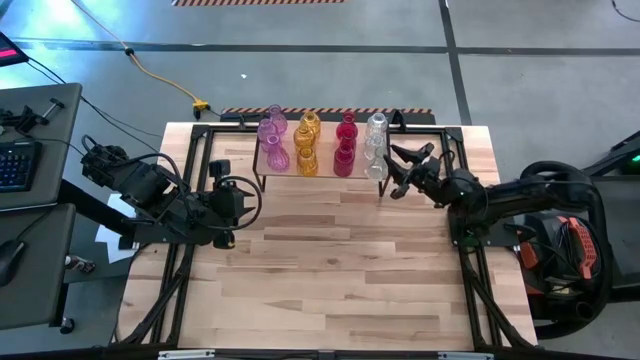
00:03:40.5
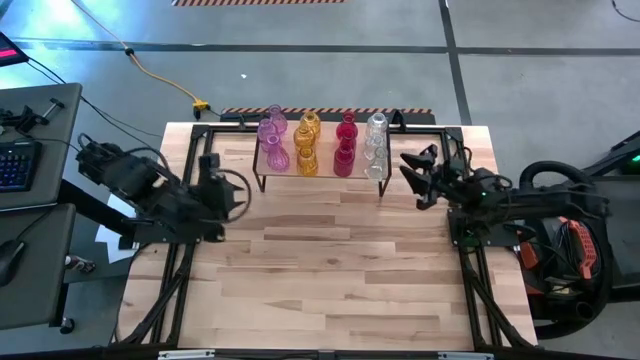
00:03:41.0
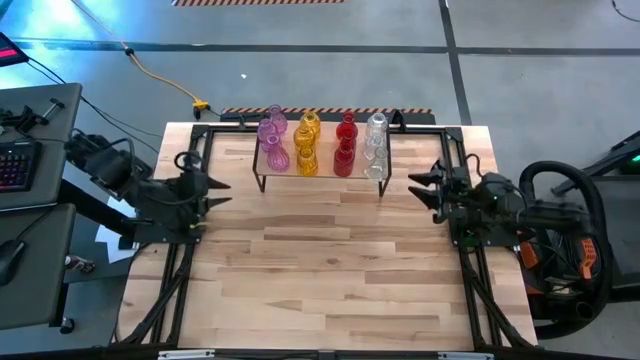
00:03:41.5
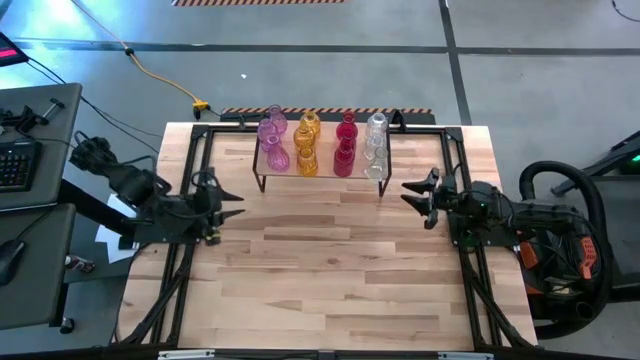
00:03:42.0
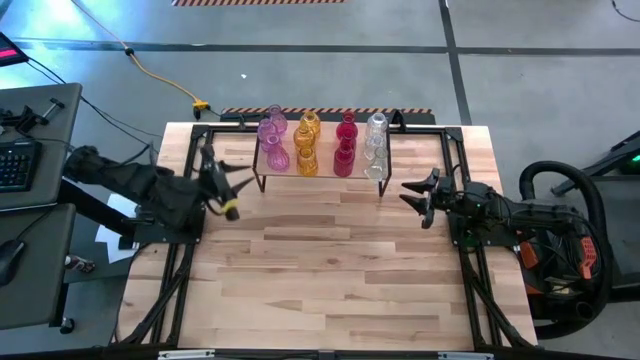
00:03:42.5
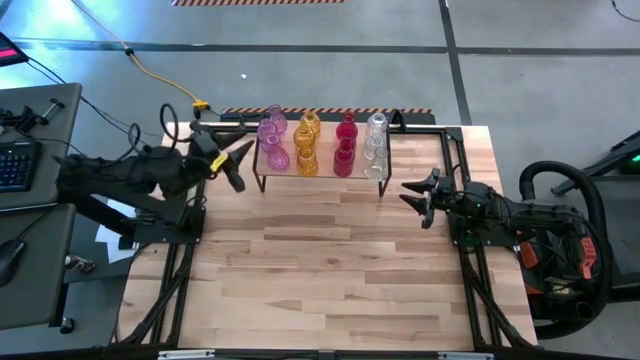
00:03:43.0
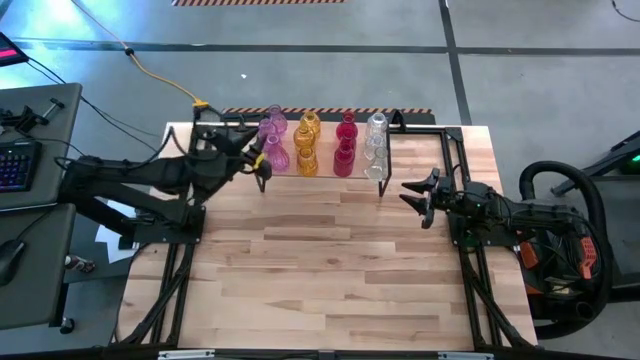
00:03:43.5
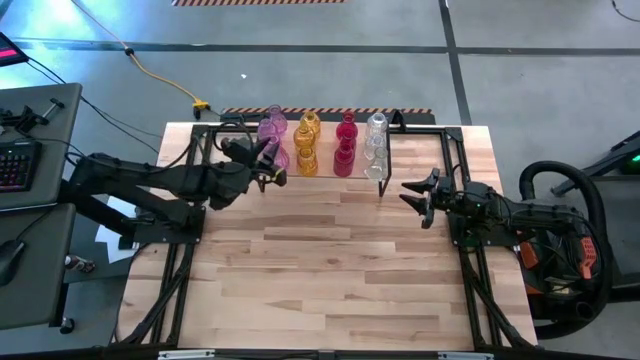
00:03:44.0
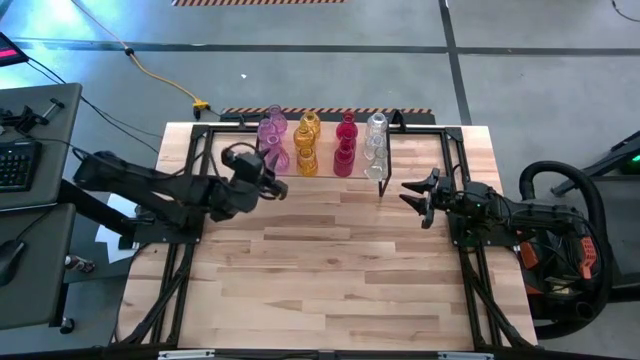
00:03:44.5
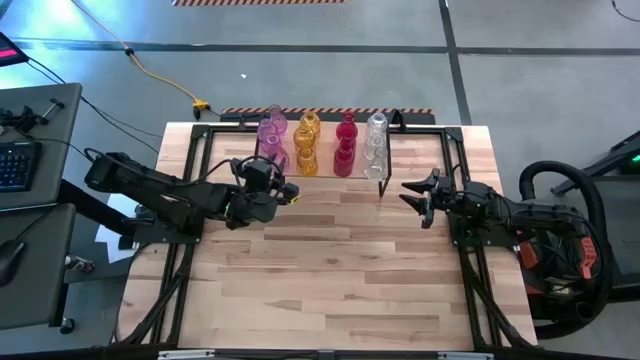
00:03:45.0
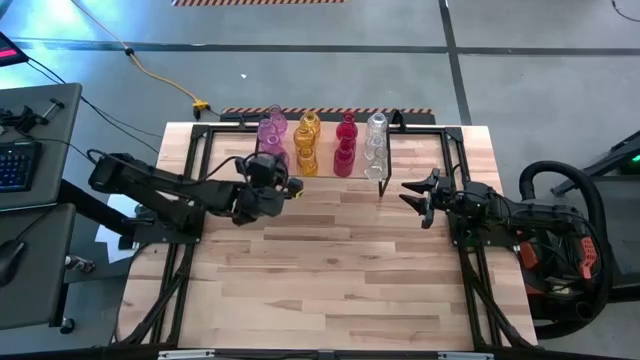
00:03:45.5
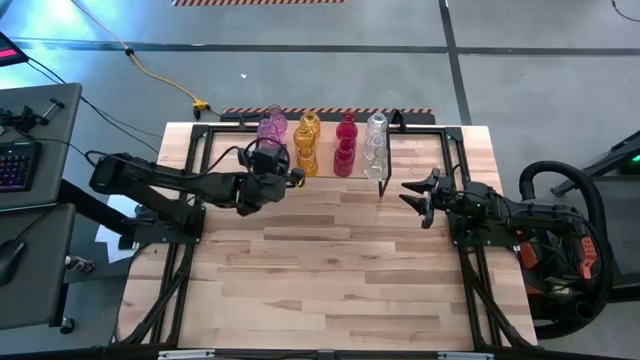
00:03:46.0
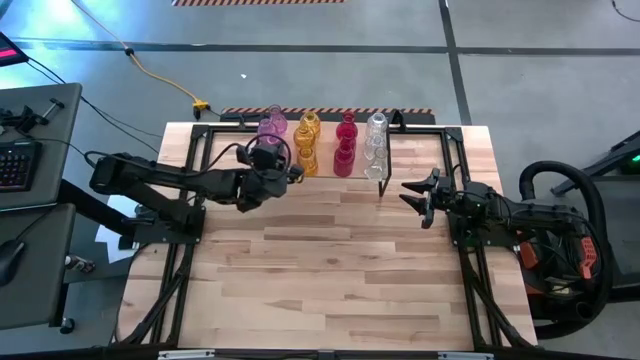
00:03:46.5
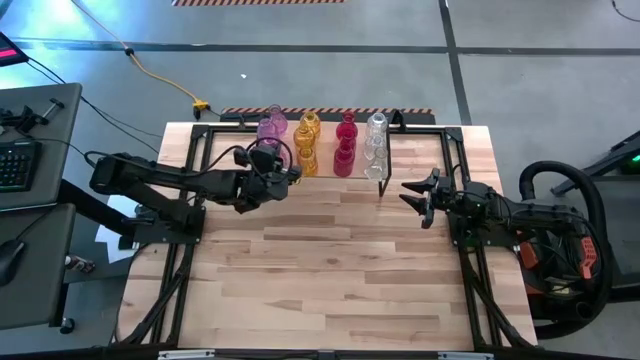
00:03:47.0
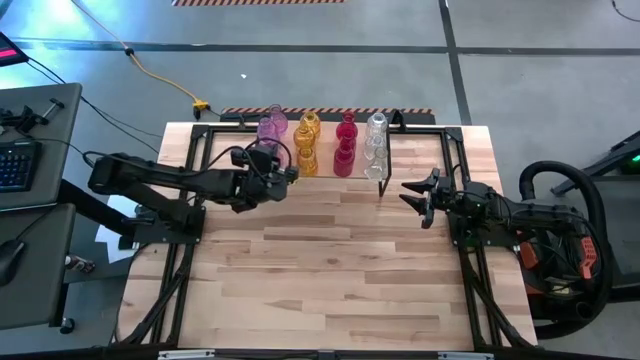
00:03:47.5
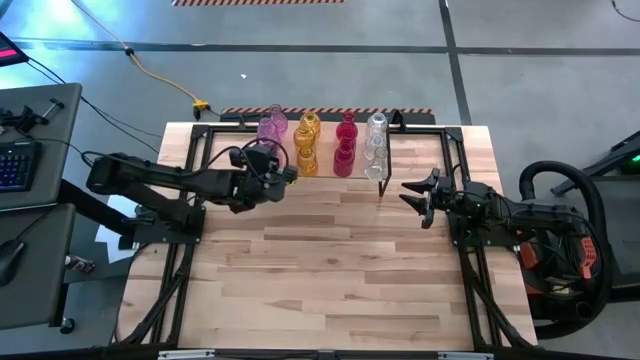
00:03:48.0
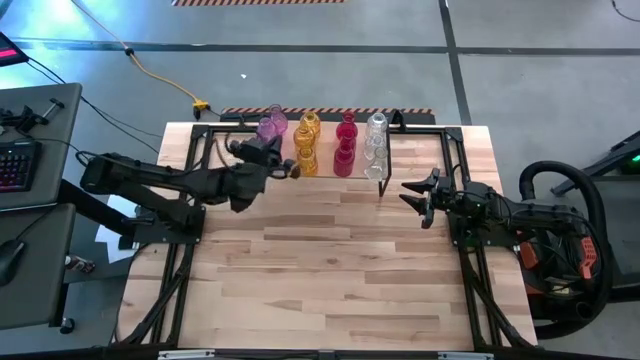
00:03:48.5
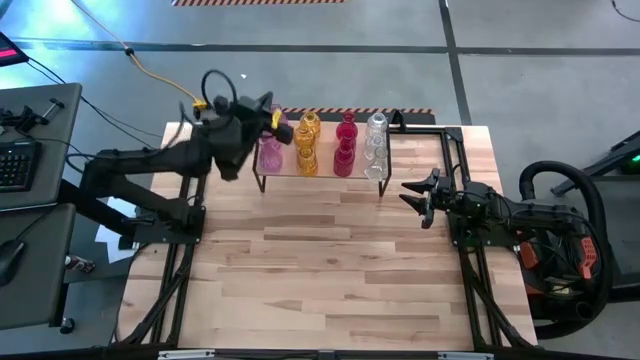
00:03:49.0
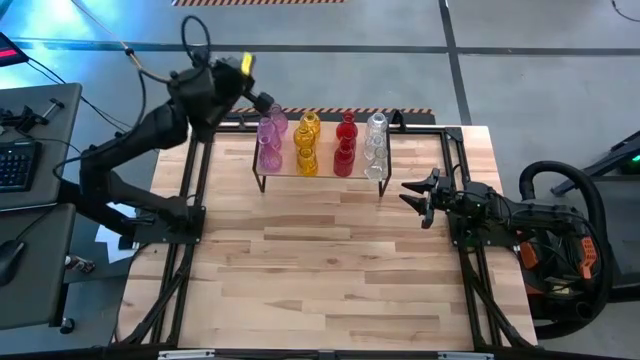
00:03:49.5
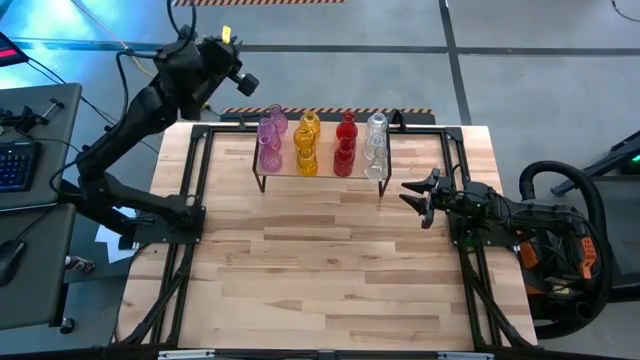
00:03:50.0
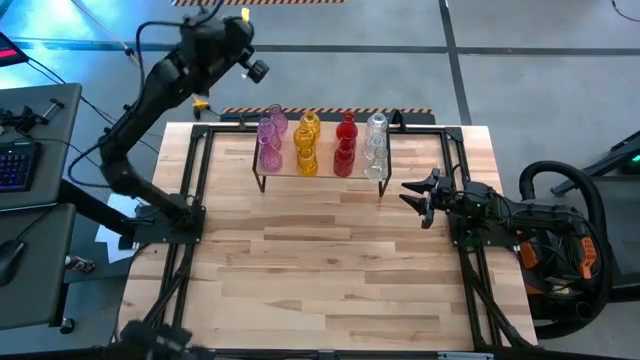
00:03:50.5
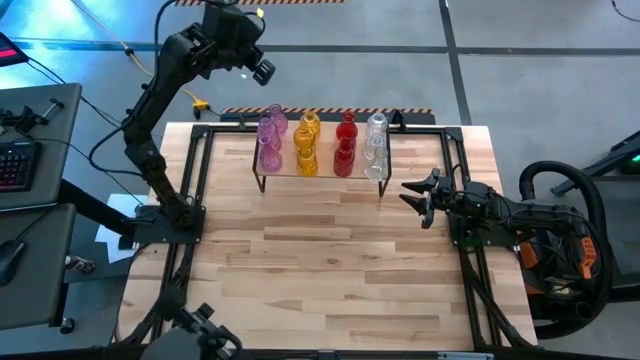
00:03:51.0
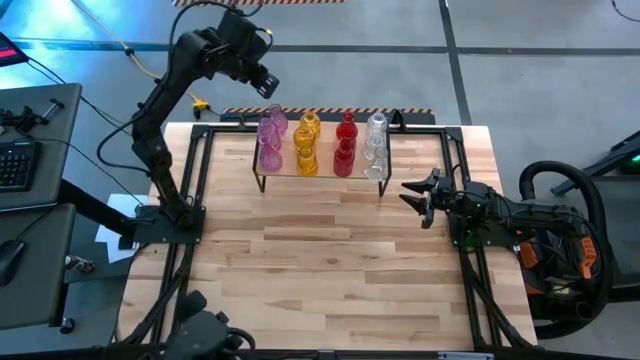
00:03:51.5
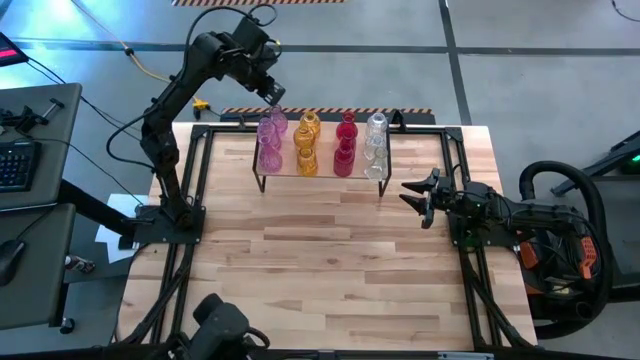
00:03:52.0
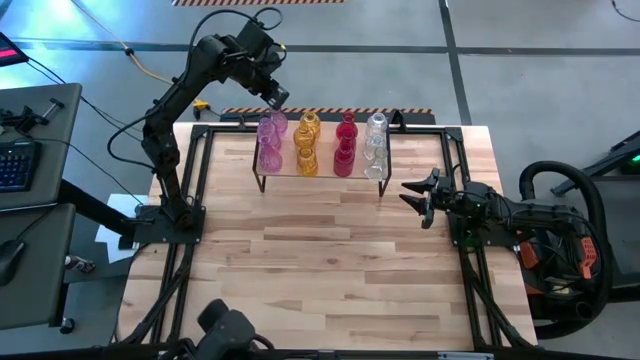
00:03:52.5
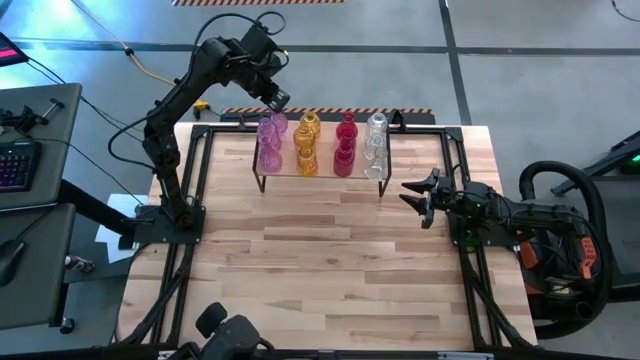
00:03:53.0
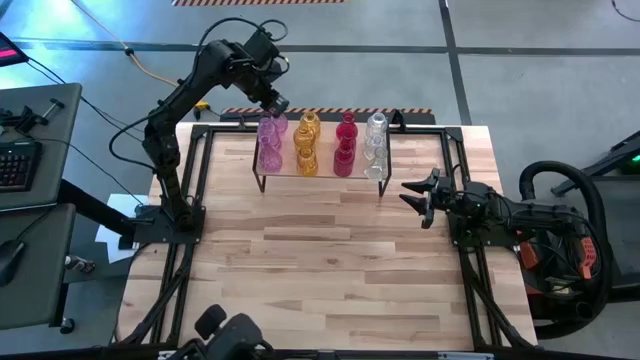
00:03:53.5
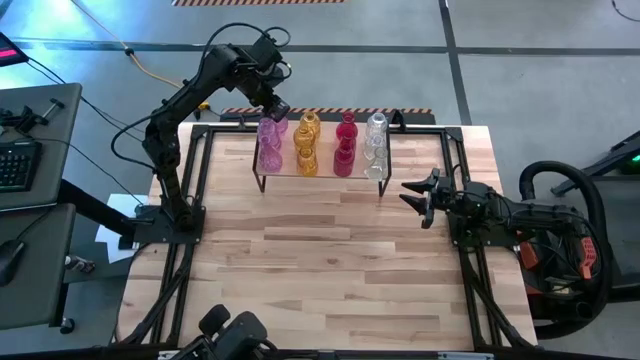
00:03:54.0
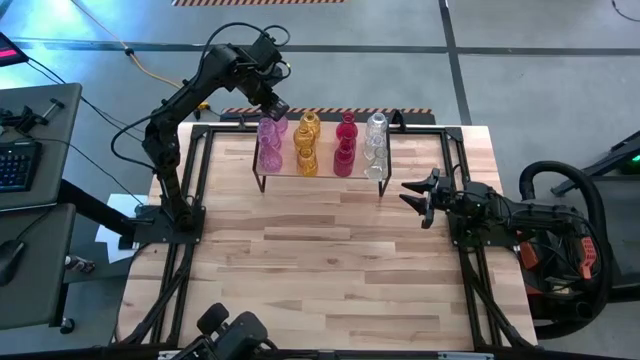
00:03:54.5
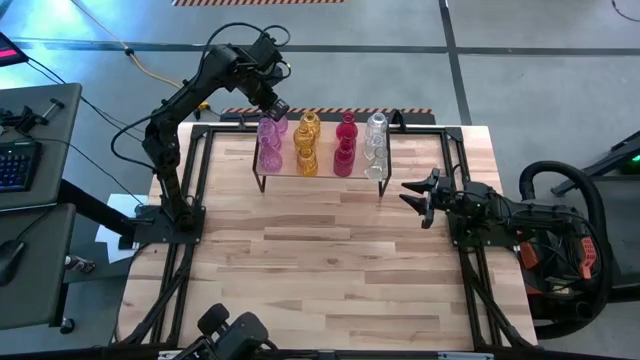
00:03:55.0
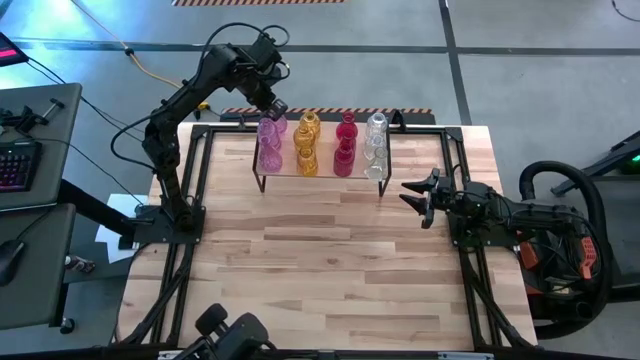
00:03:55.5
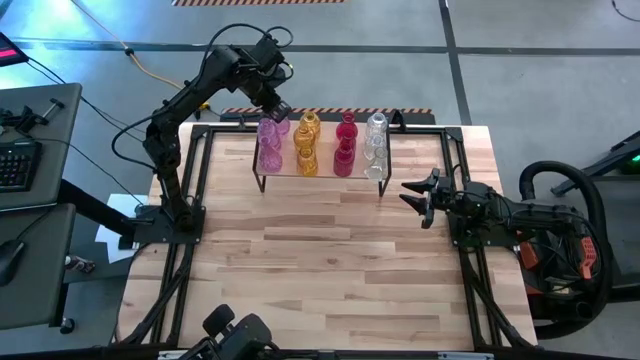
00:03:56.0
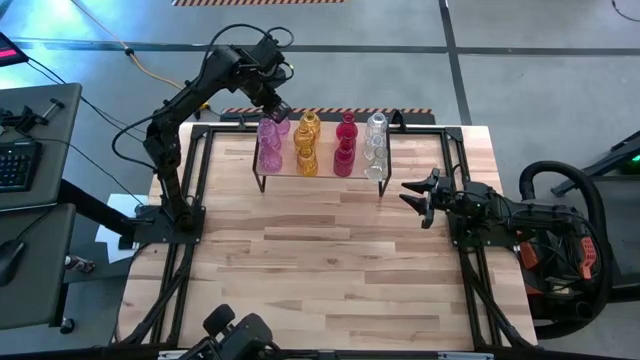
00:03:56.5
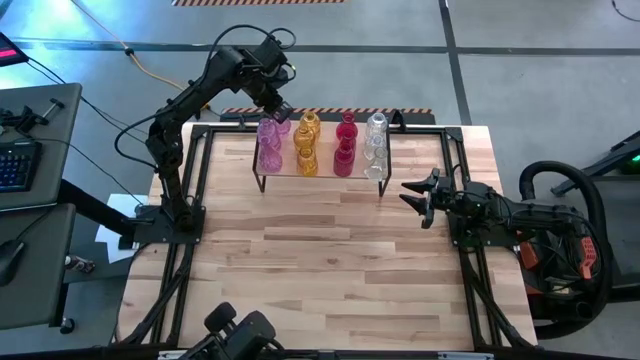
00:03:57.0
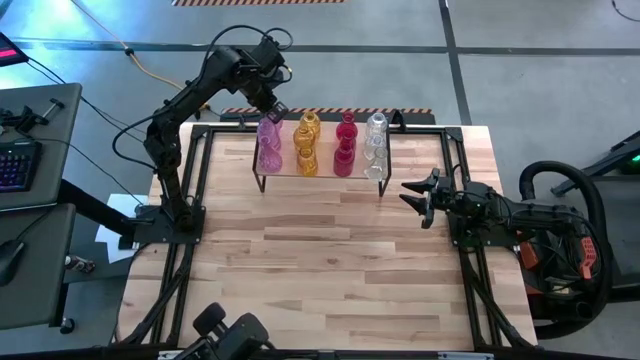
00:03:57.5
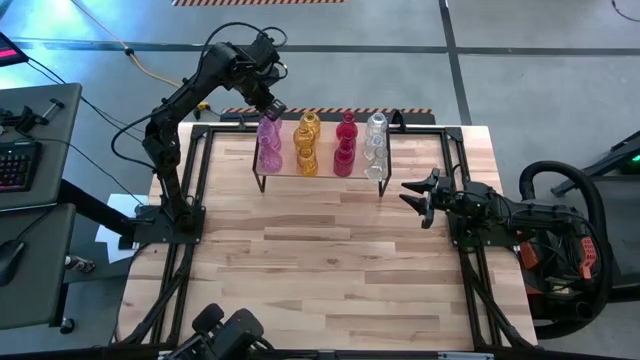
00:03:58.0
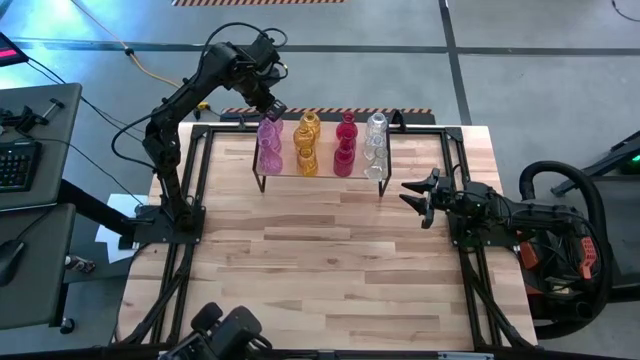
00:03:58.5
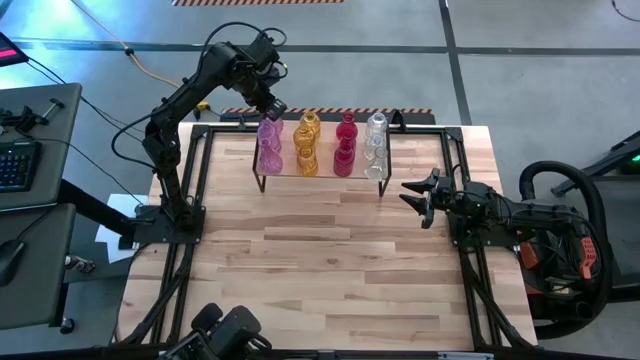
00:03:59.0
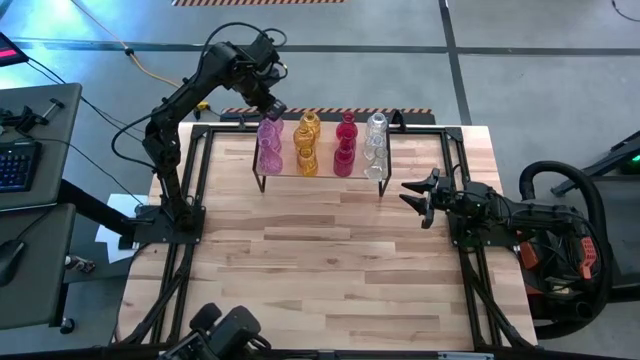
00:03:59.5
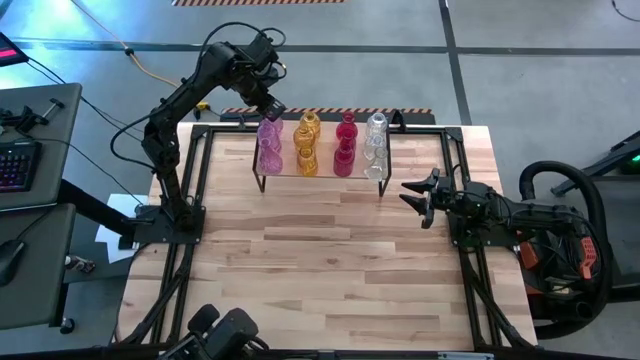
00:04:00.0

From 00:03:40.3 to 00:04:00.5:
Task: sort vases onto shelf
Adjust the purple vases on the shelf

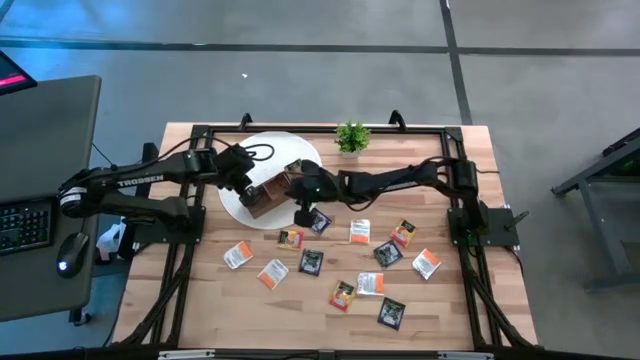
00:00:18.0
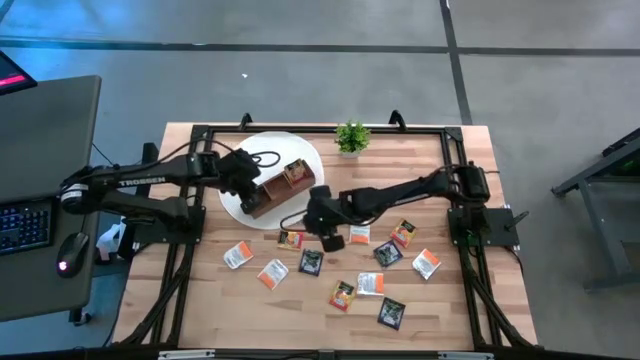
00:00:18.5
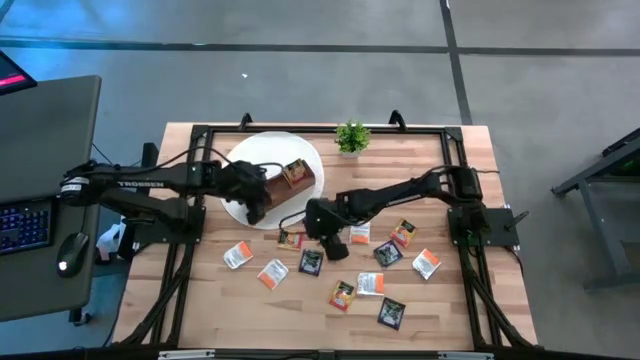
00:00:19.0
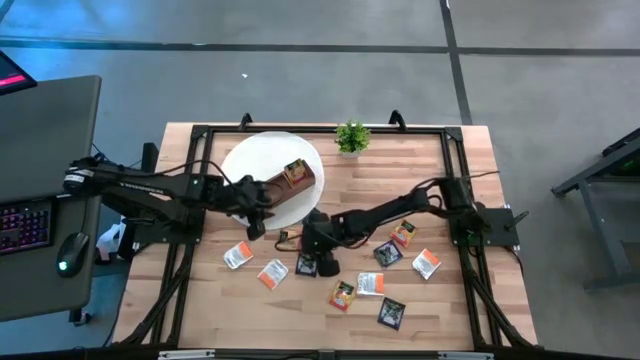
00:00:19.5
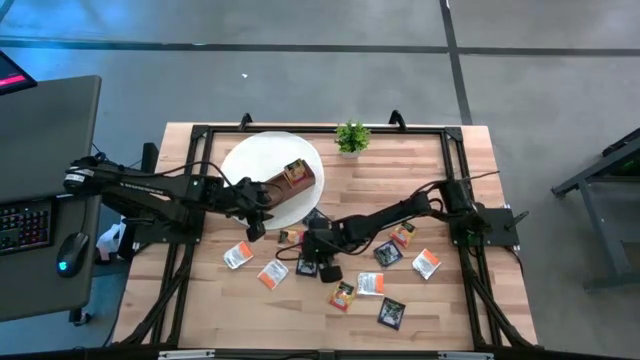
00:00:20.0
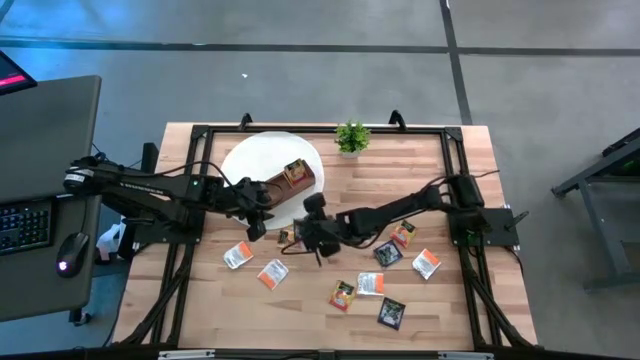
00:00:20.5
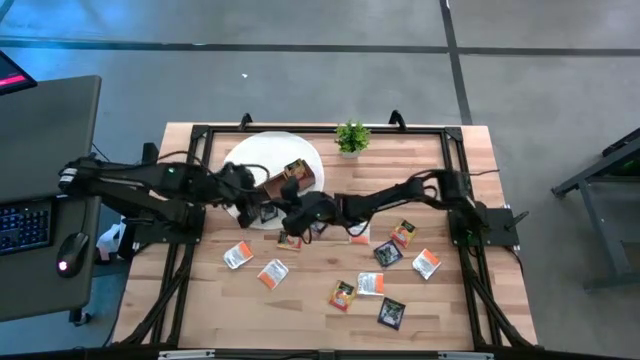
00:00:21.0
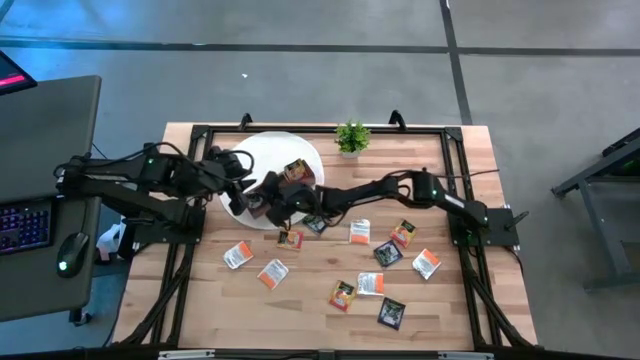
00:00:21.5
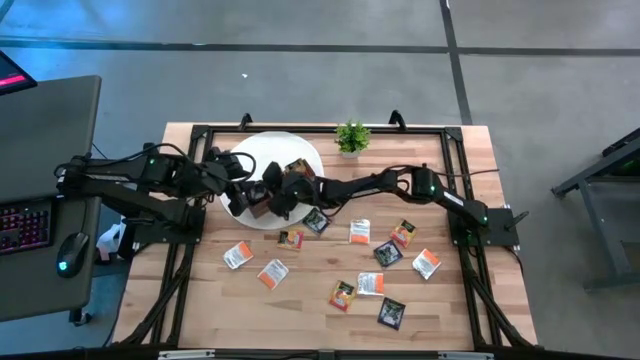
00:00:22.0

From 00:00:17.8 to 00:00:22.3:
Task: Pick & Place Tea
Put the purple tea bag into the left section of the wooden organizer
